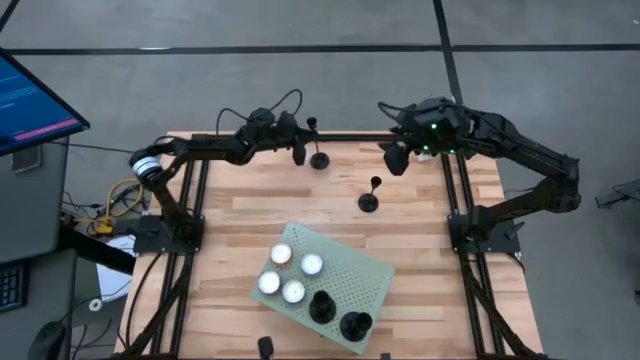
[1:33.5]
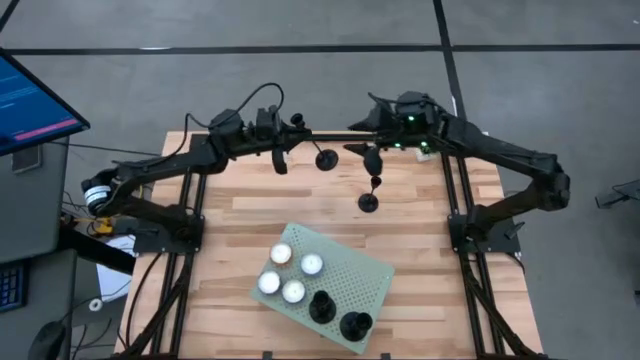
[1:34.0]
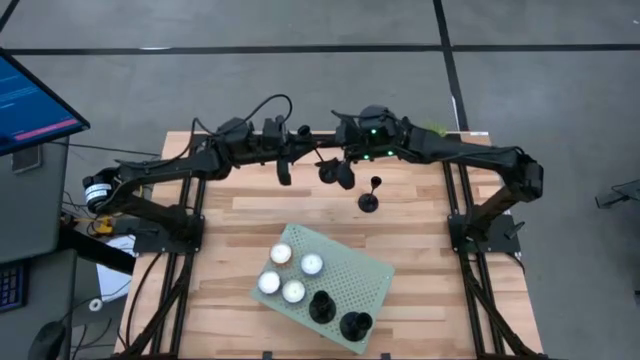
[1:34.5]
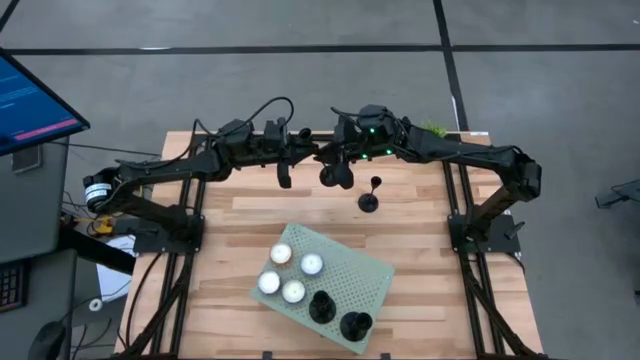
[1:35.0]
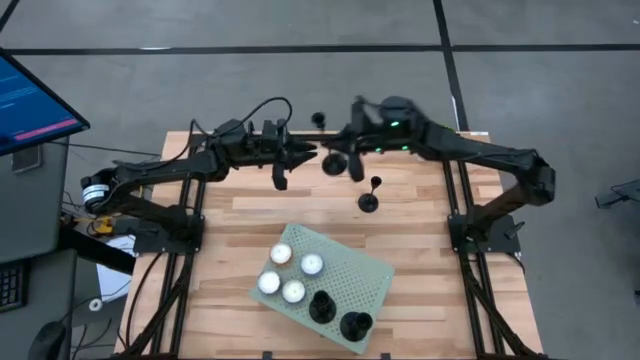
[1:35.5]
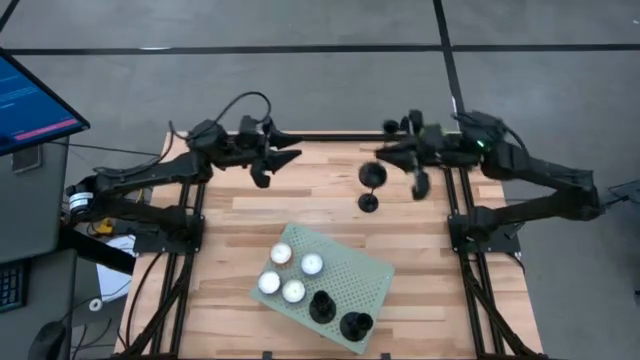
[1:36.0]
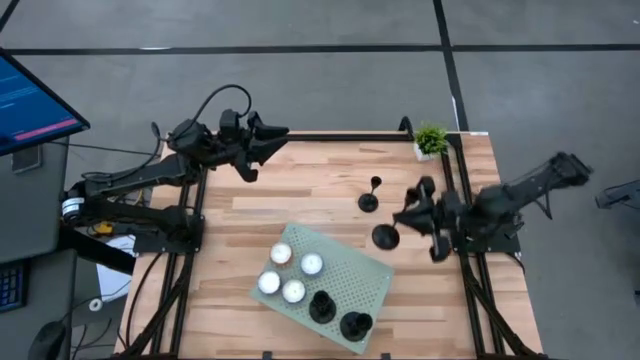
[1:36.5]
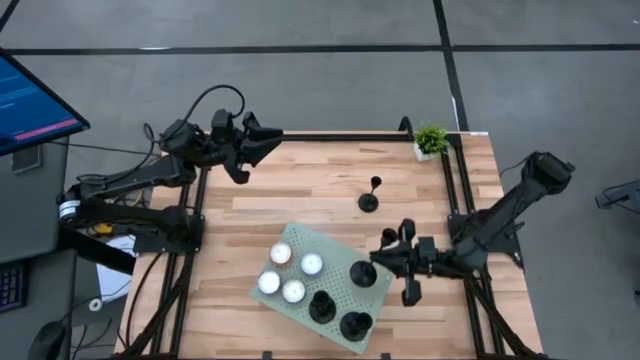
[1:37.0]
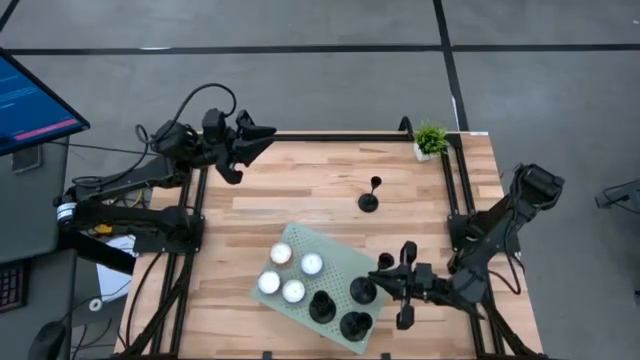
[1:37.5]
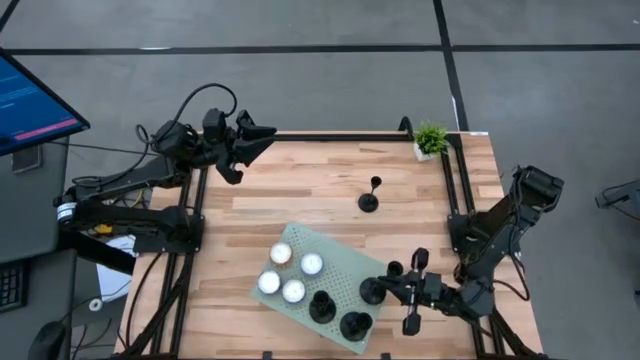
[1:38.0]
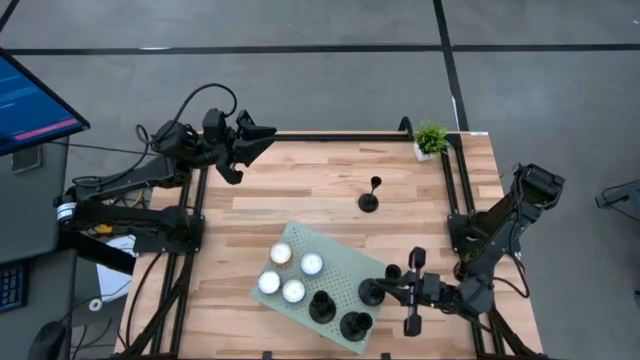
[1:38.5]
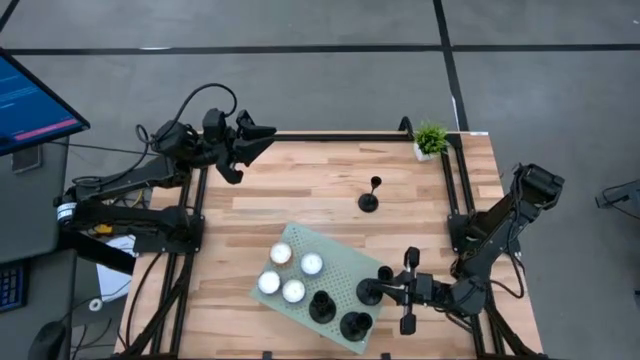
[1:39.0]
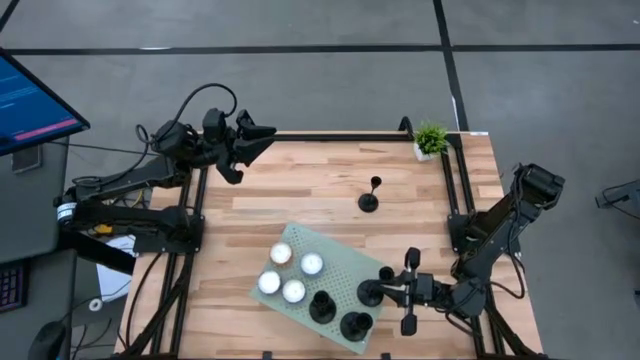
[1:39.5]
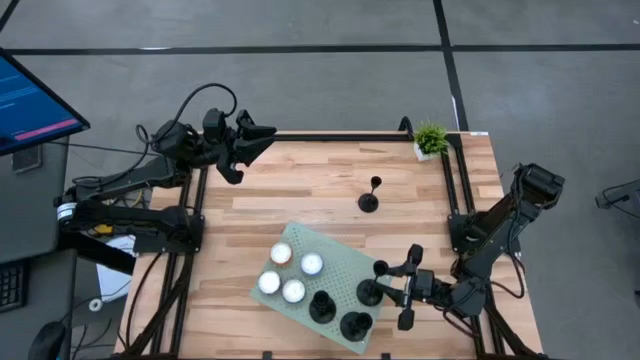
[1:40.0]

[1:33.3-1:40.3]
Task: Pick & Place candle stick holders
Put the candle holder on the shelf aligned with the other candle holder

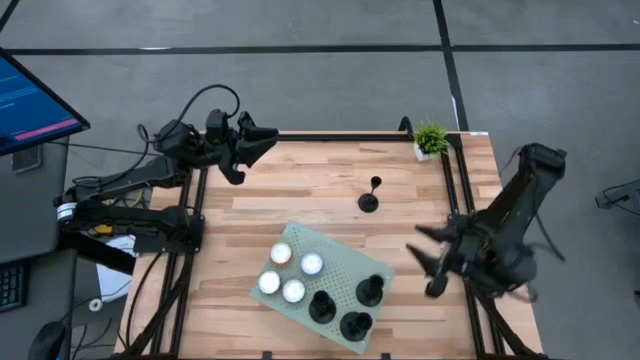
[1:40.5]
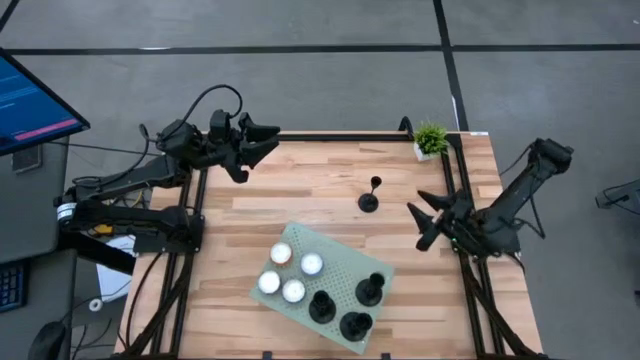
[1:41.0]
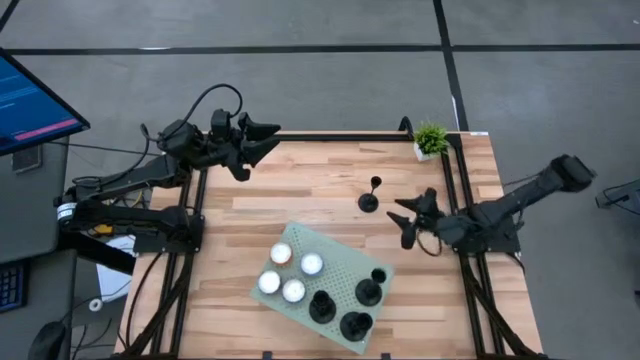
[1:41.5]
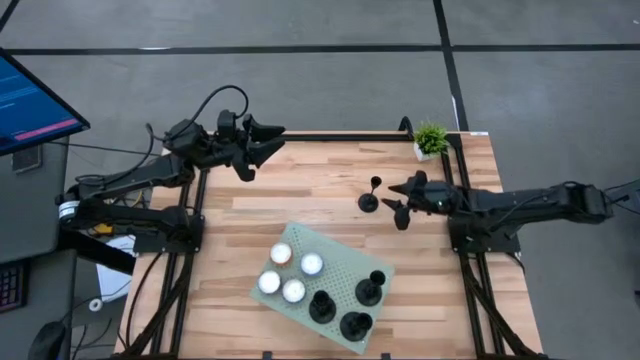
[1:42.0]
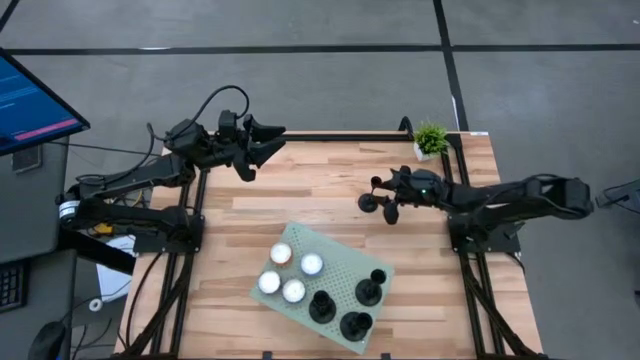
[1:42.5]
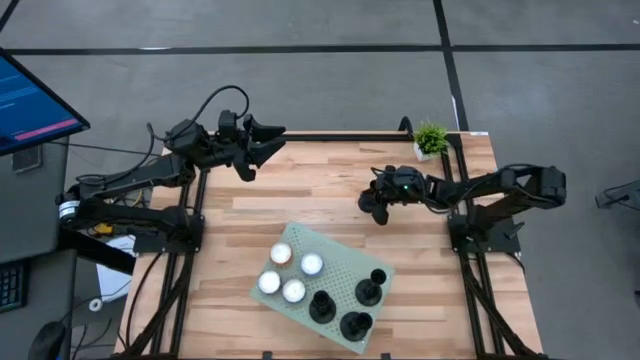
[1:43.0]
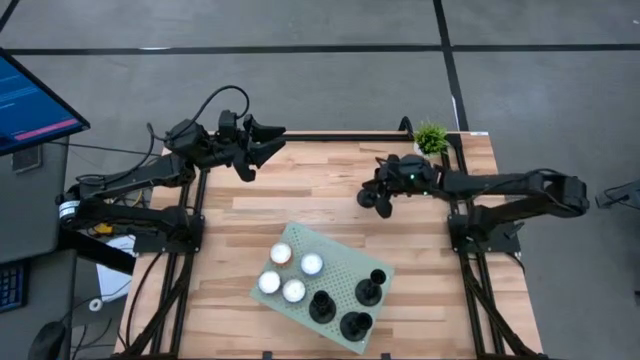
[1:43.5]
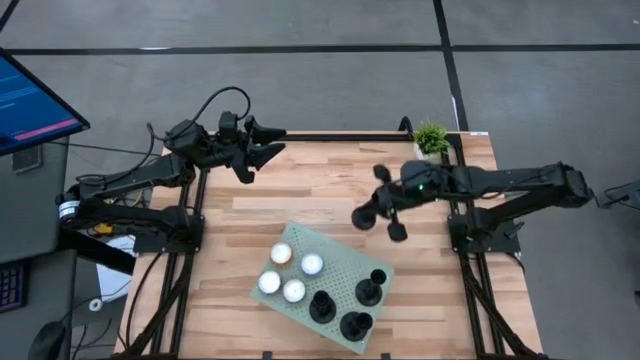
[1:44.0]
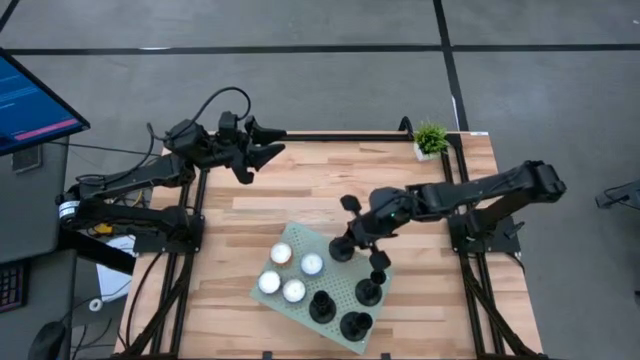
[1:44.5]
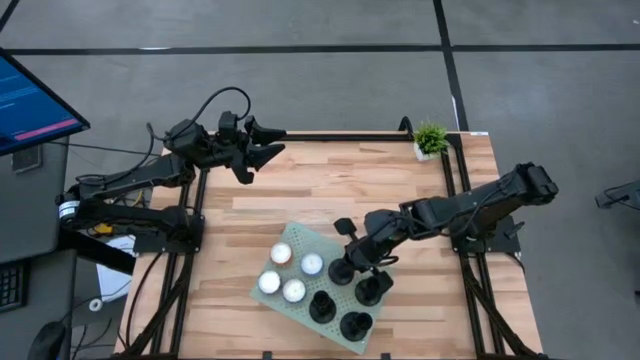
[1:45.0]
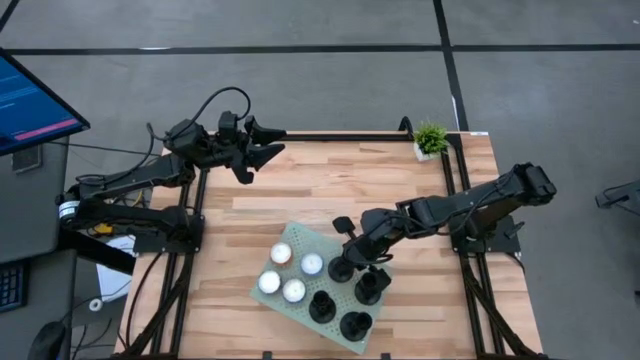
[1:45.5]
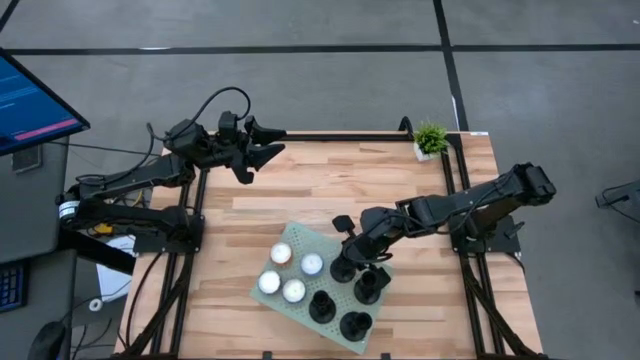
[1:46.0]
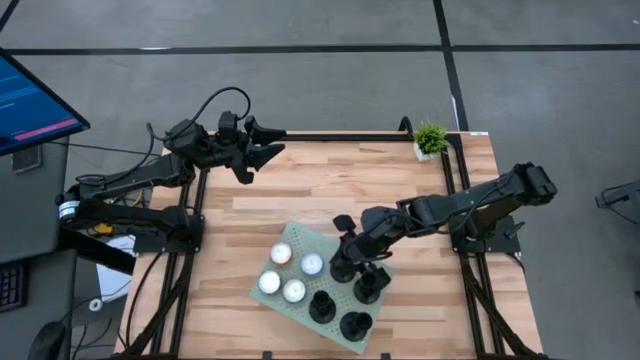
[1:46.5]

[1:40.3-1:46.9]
Put the candle holder on the shelf aligned with the other candle holder

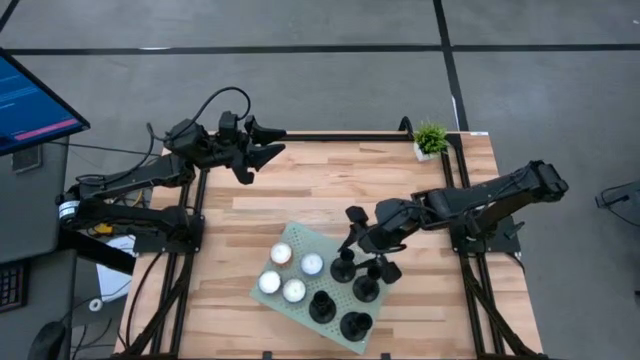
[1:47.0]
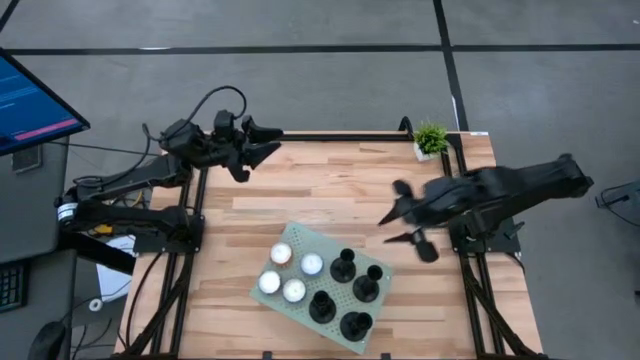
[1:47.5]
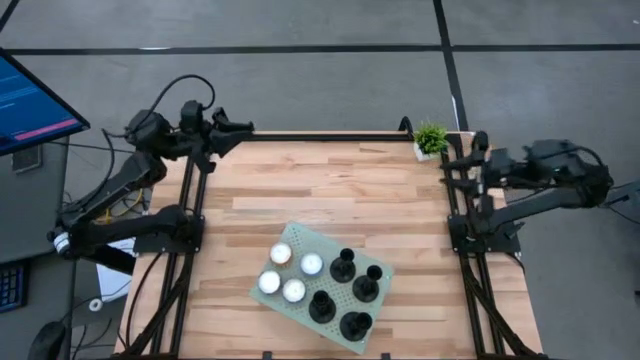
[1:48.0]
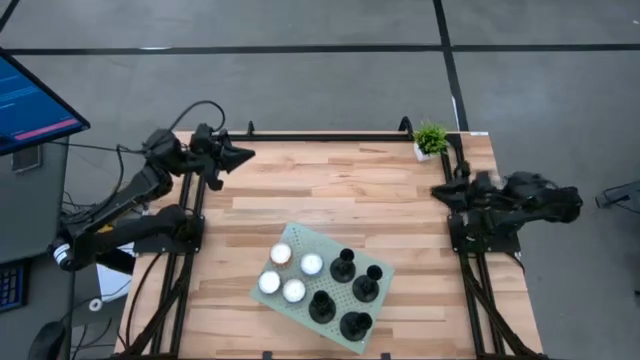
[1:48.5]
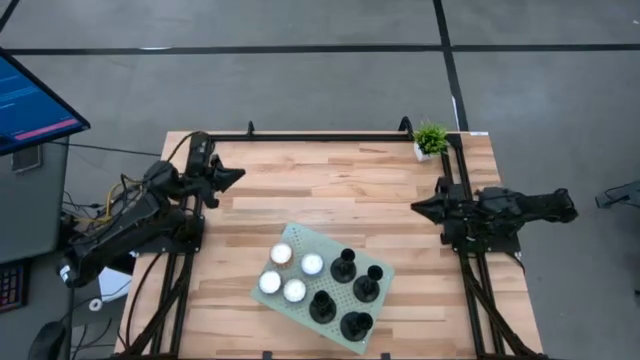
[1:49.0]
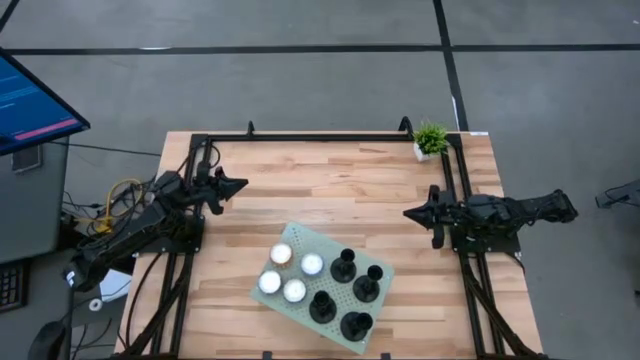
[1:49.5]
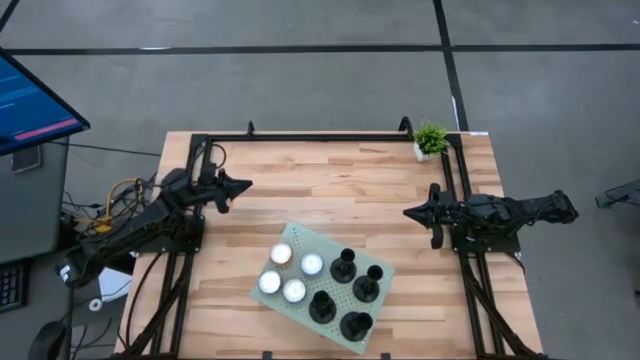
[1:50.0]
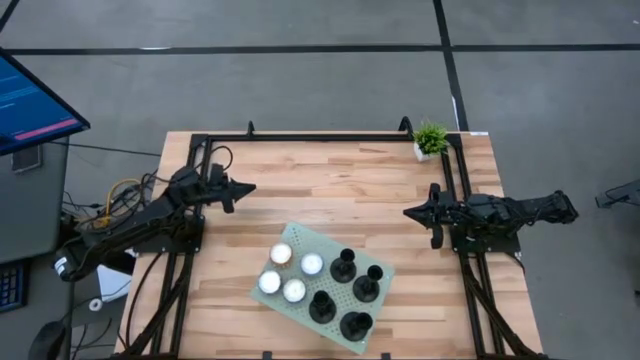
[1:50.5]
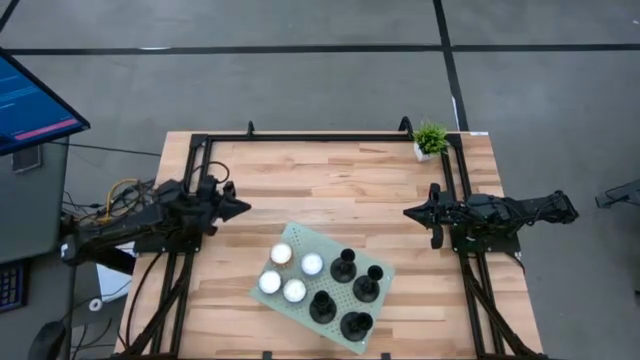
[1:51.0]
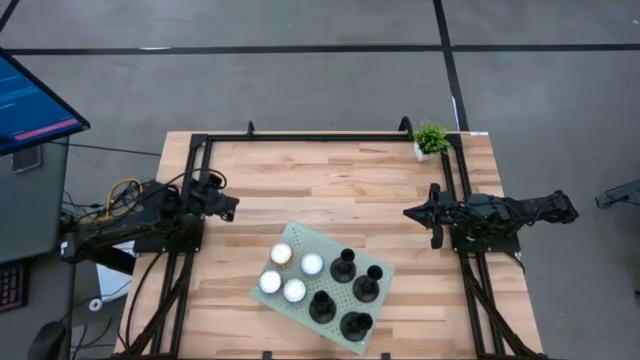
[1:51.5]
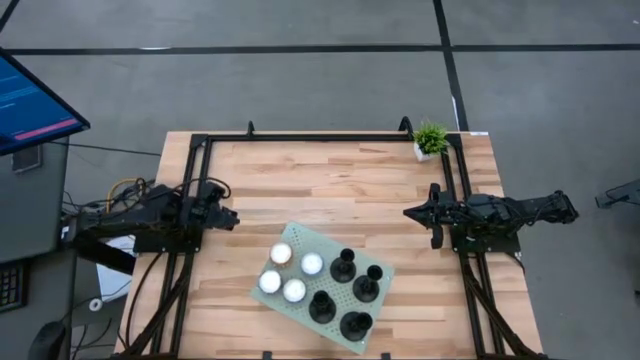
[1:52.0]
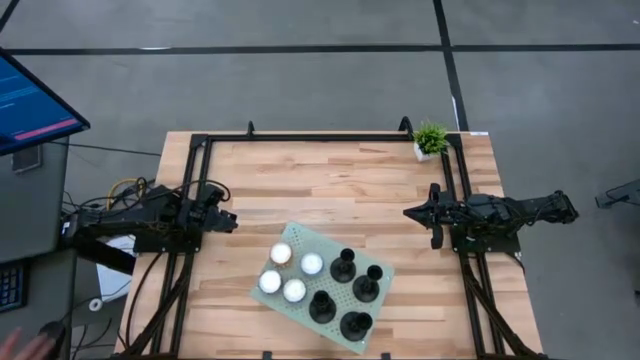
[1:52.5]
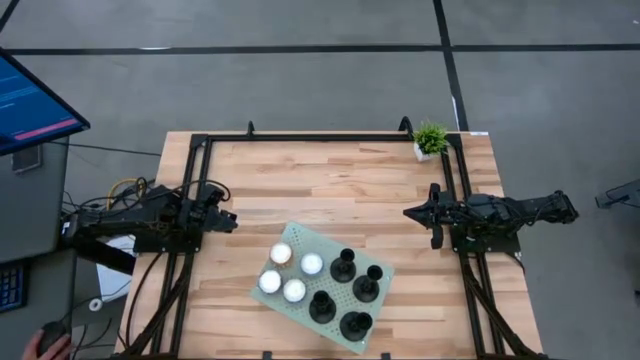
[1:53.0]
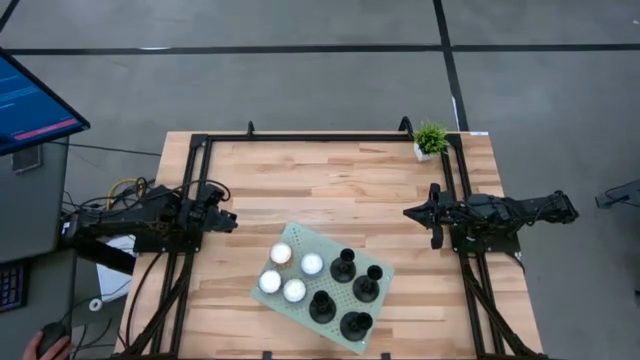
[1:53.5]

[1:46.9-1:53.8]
Return to Home Position
